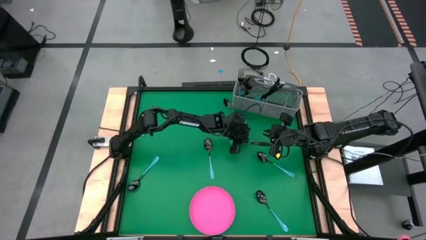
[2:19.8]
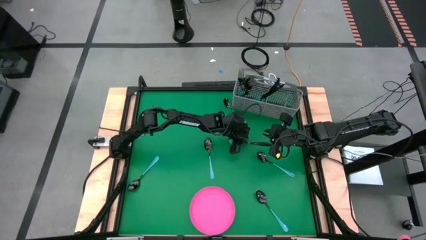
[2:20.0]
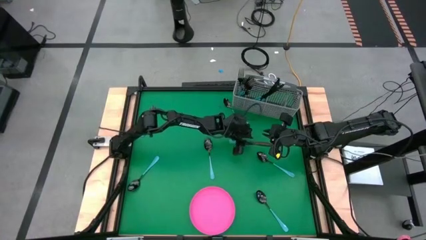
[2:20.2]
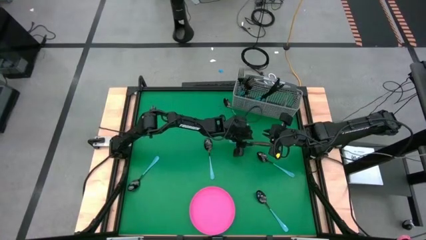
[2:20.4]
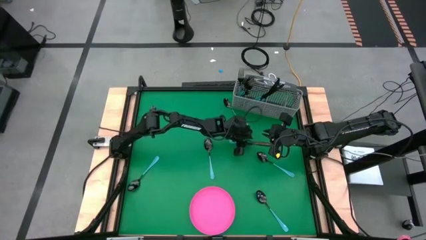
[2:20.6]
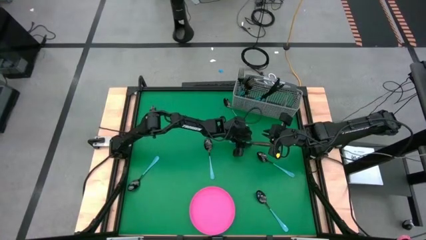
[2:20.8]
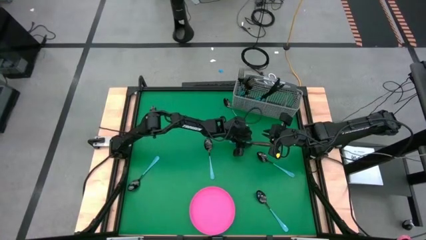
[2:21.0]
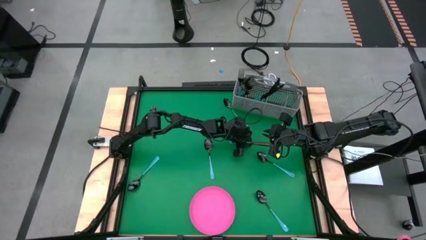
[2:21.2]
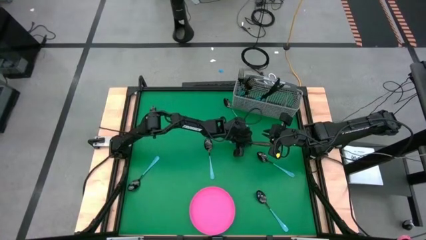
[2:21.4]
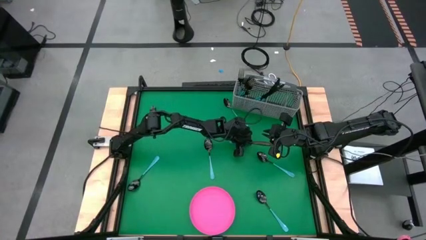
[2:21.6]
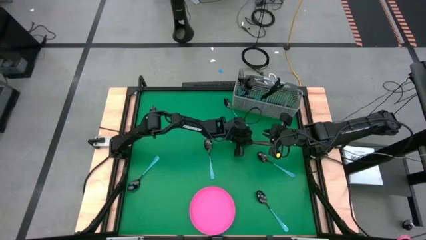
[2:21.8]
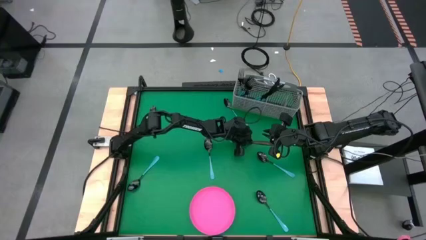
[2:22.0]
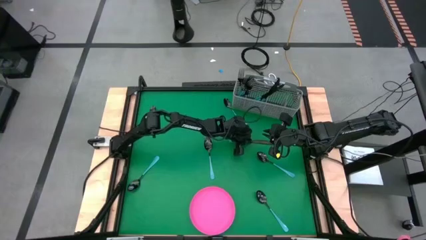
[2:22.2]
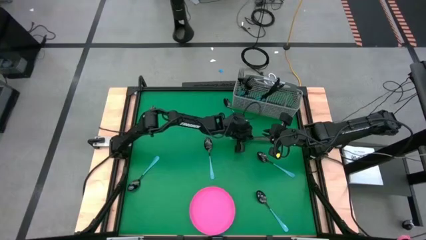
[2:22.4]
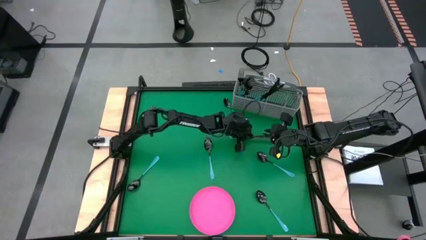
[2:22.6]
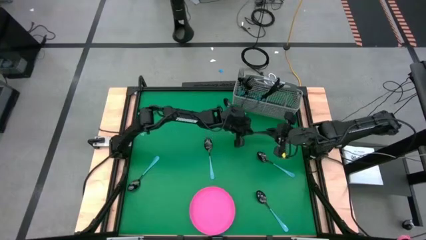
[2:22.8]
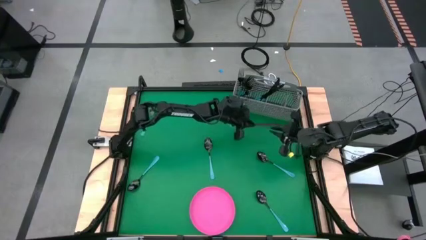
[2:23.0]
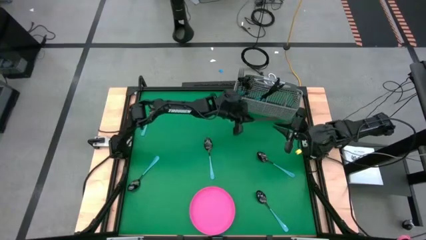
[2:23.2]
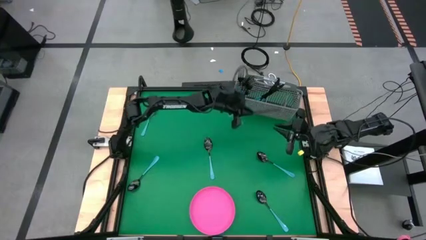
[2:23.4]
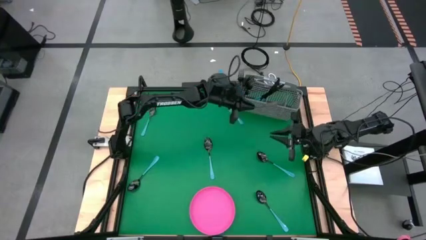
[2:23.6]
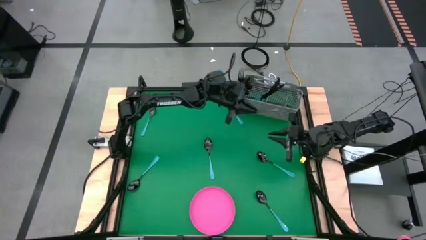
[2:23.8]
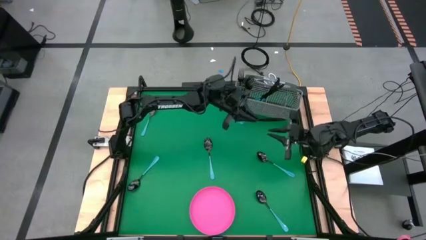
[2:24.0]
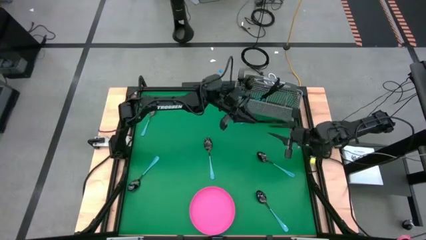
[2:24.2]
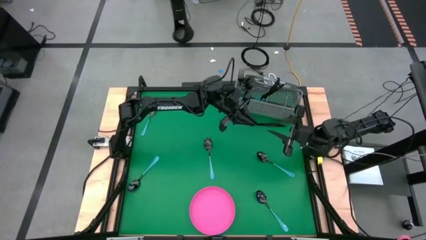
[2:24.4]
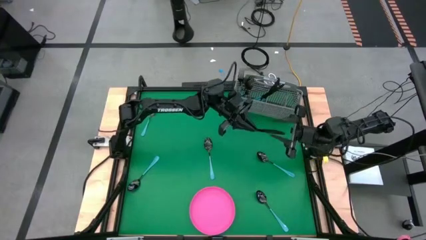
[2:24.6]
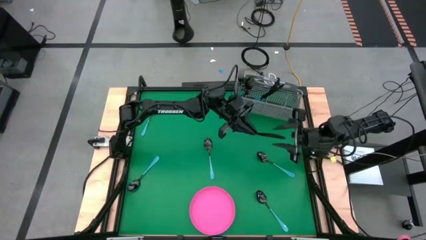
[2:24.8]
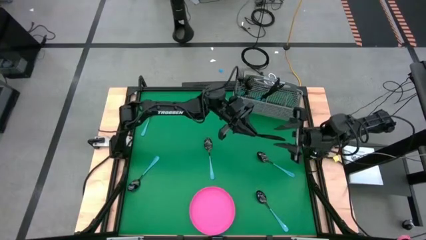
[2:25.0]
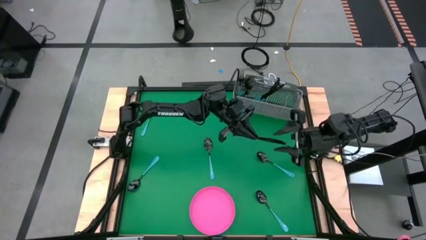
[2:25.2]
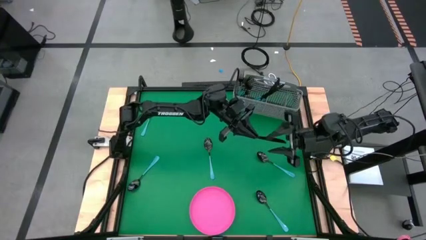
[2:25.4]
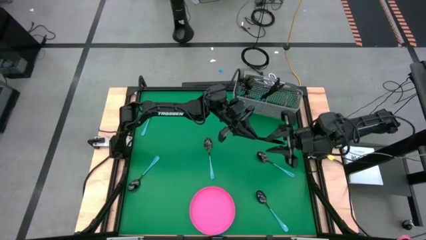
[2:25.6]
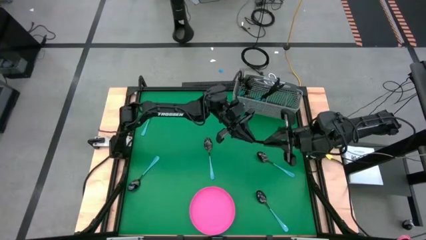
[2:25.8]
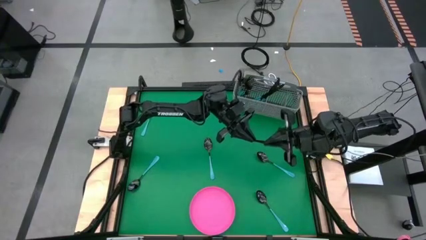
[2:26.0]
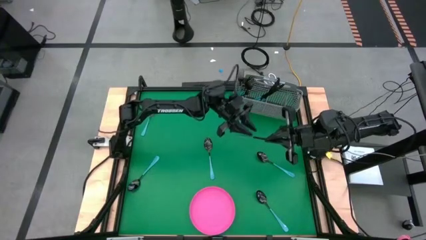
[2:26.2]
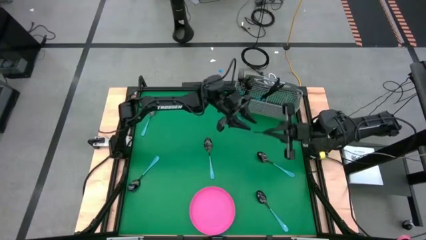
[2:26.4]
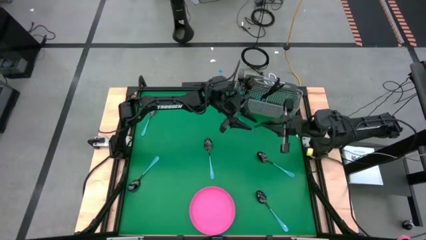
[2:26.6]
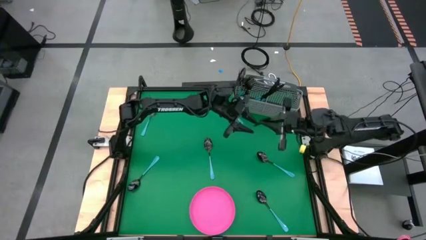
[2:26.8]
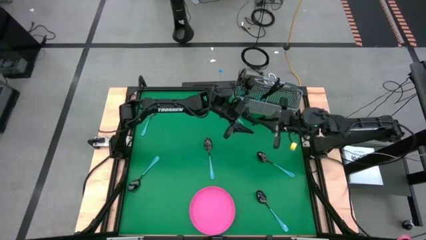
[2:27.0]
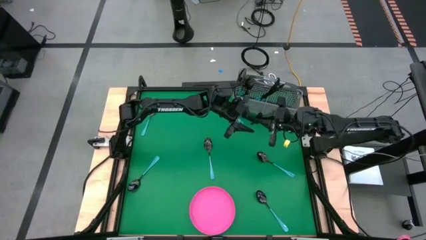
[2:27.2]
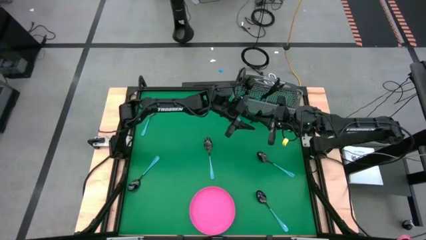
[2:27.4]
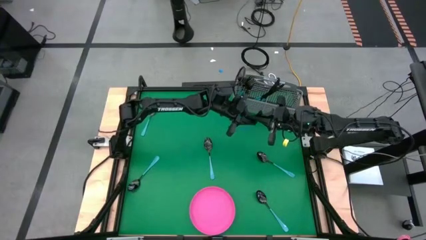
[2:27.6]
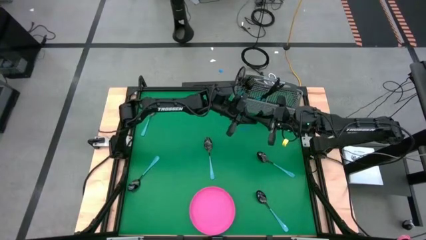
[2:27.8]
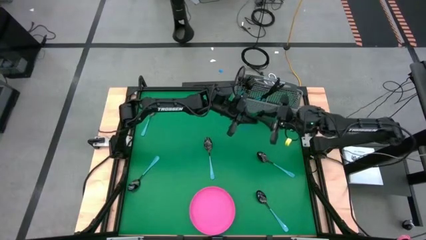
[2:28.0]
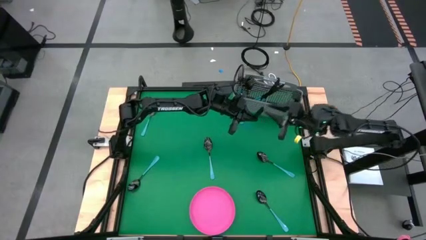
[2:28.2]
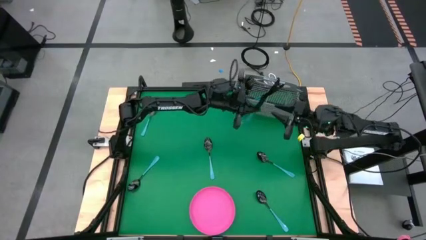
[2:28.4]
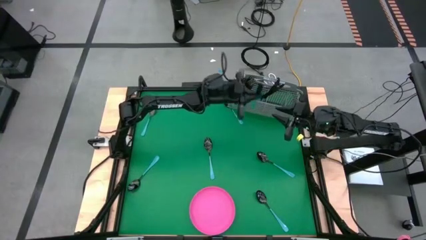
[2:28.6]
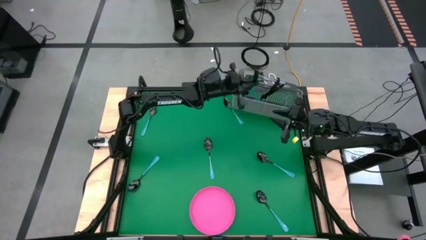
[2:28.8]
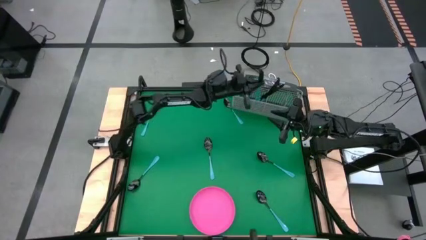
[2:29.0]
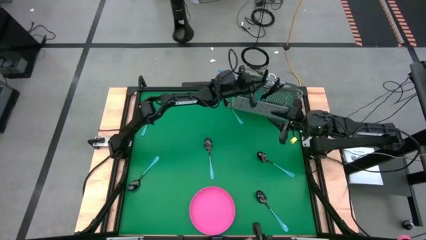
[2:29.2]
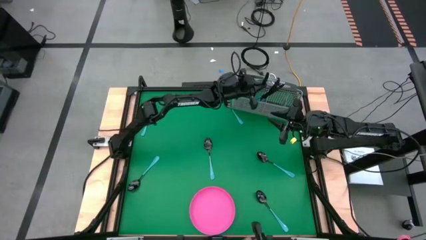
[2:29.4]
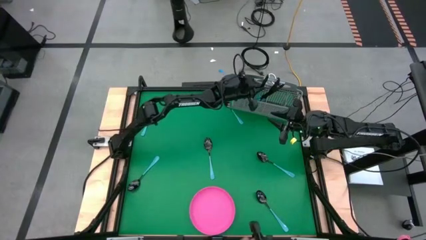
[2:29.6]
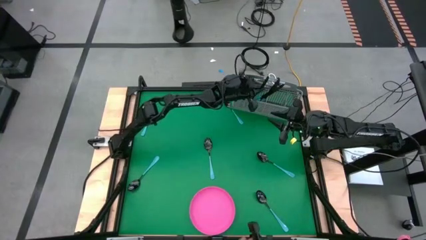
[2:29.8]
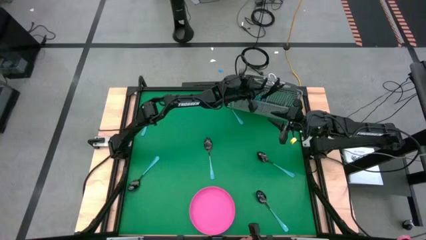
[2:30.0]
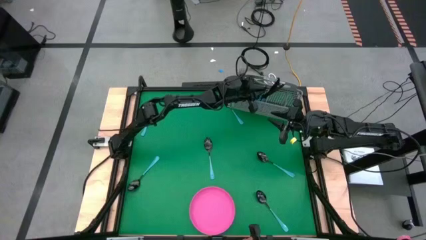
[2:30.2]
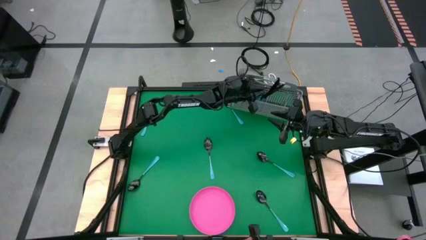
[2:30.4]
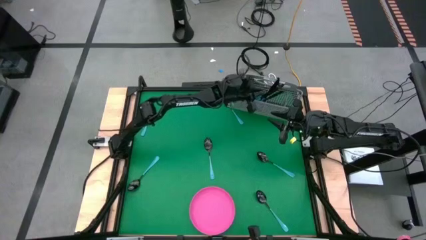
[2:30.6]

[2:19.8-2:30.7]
Task: Sort silverware
Put the blue knife into the utensil holder

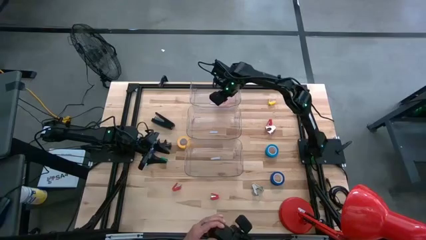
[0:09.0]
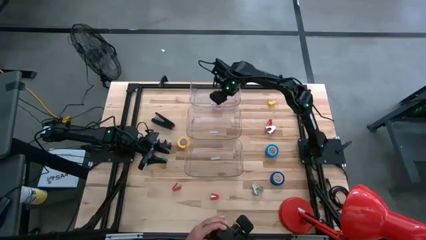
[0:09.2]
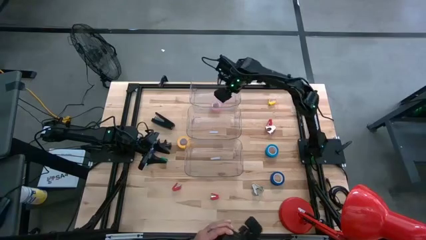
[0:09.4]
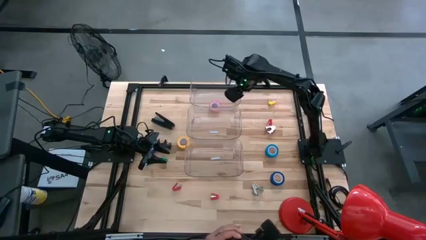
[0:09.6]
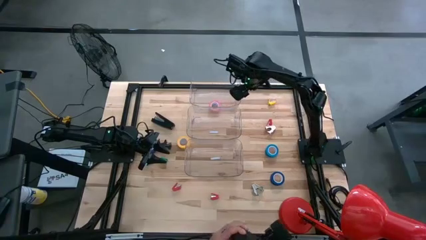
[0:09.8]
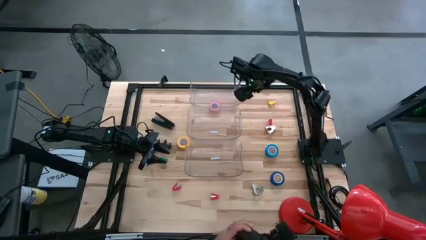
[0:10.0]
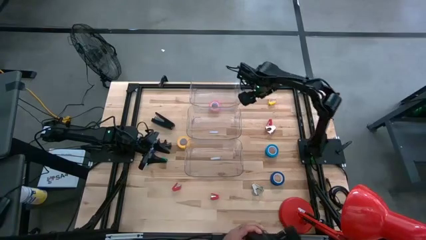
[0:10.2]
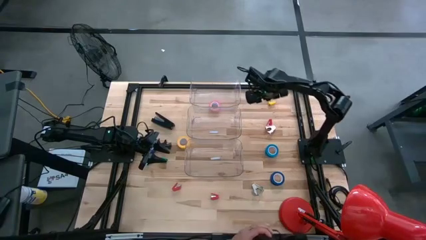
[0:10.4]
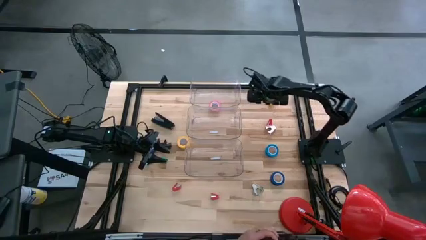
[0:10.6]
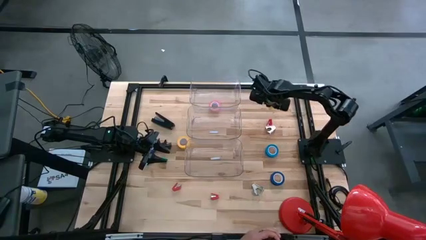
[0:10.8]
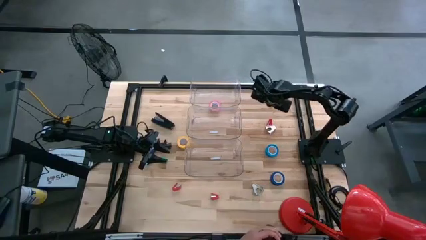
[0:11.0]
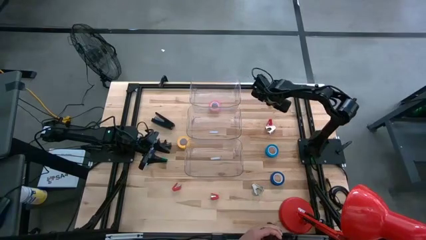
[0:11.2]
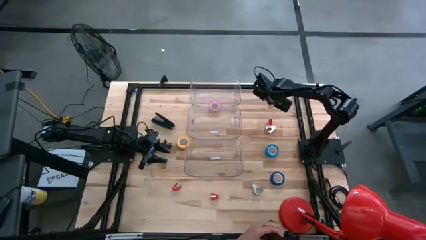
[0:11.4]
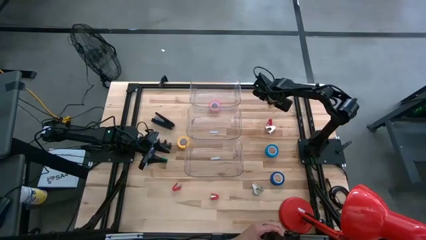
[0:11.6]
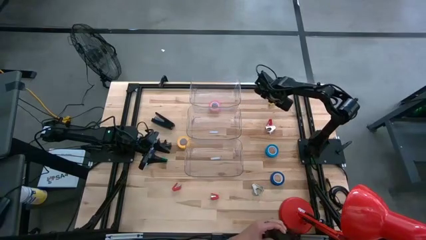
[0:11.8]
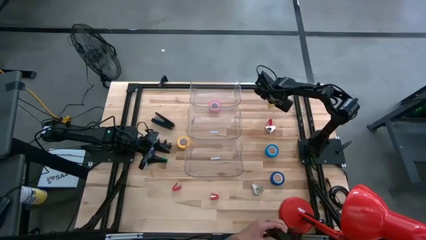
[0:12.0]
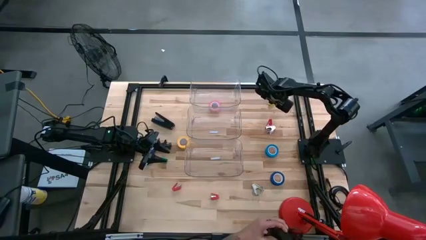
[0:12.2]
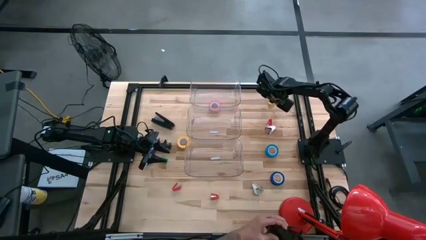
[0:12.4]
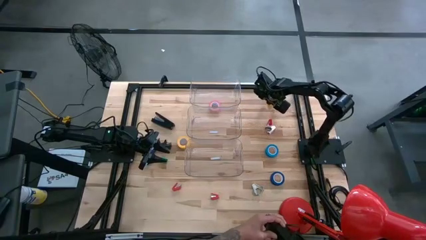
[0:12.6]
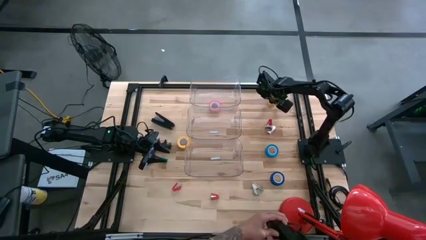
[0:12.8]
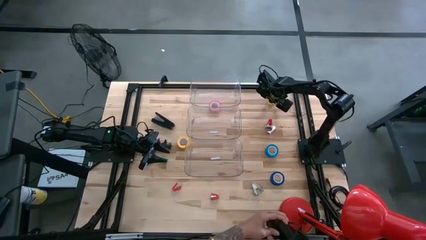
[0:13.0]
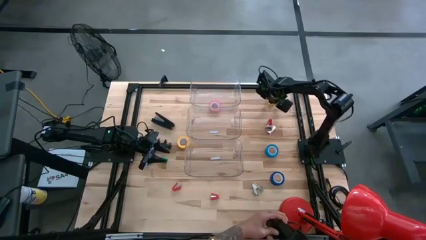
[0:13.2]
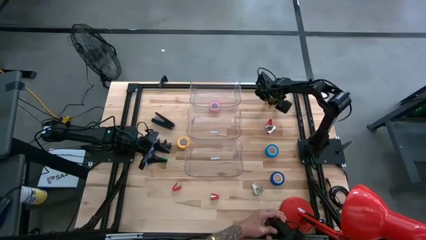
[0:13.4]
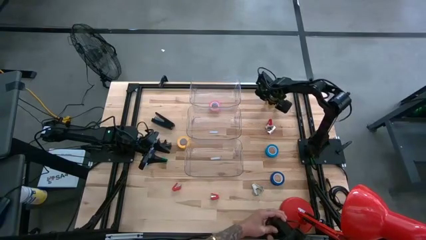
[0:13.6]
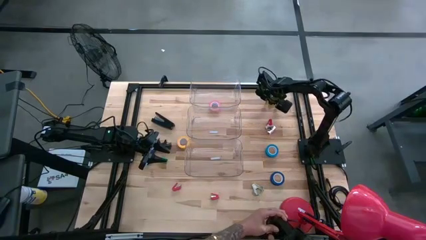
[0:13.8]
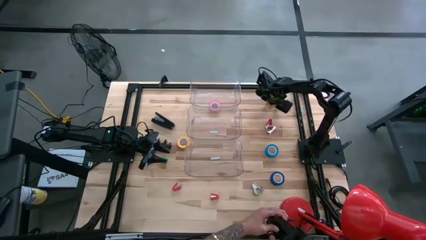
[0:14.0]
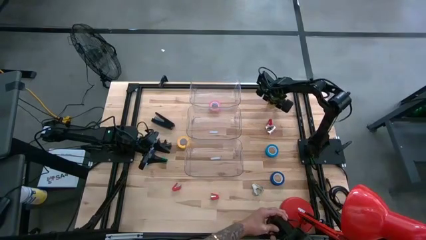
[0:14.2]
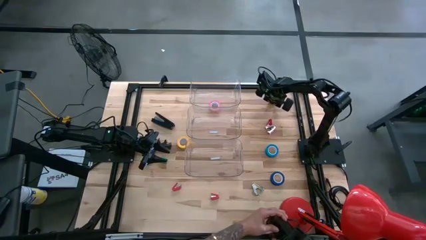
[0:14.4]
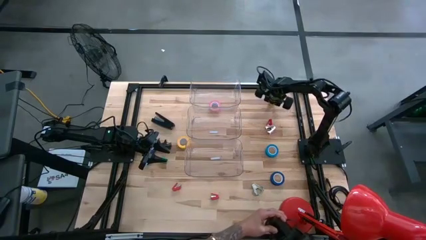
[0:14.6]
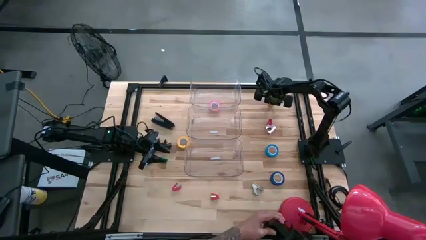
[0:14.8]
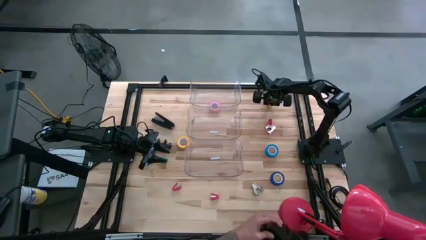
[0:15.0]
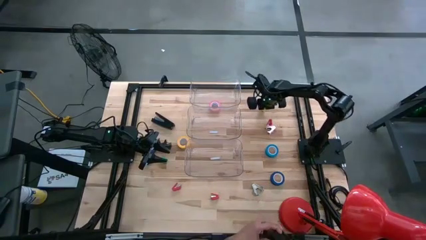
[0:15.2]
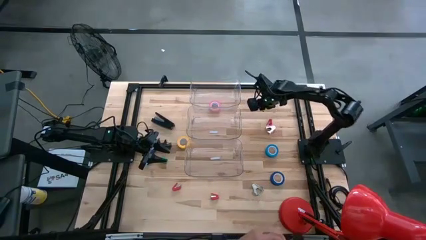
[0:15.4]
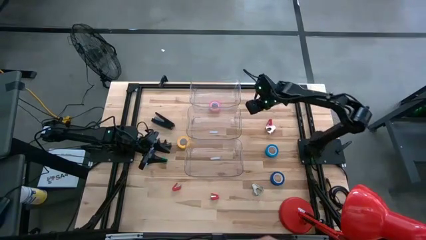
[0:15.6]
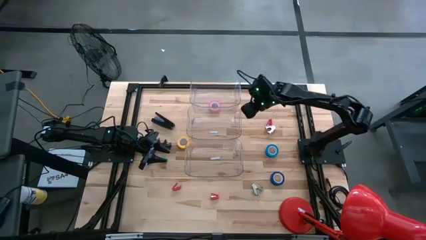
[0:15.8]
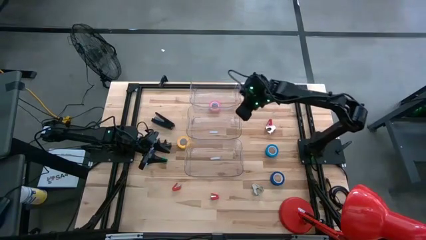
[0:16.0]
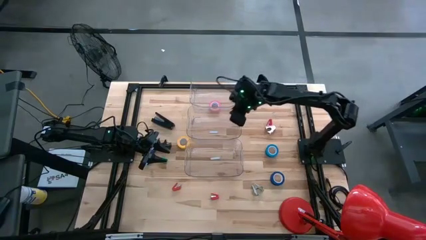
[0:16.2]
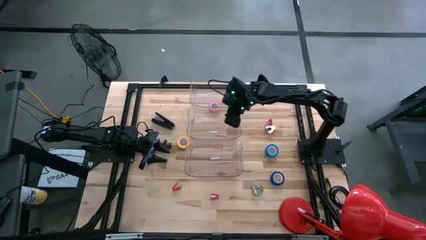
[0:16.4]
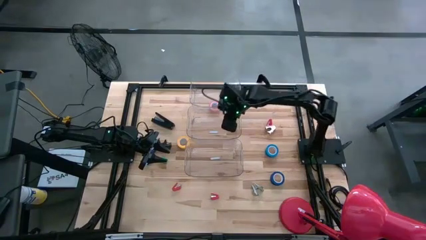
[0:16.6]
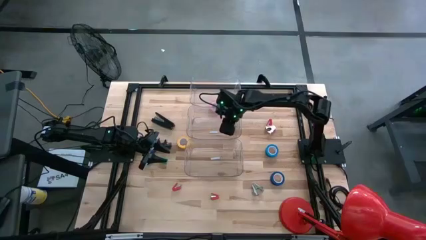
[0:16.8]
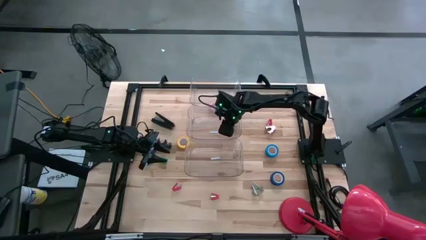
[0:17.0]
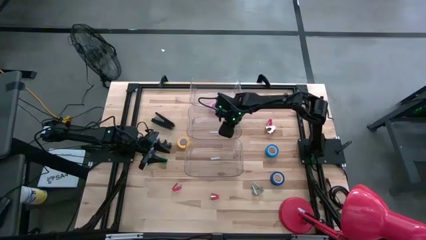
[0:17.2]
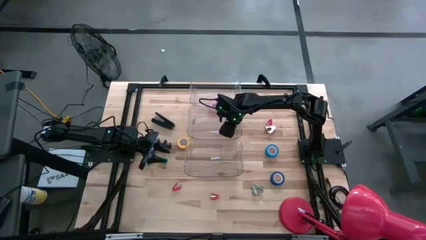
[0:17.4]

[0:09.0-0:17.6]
Task: Pick and place Stapler, Stapler remover, tape
Put the yellow stapler into the middle transparent bin
